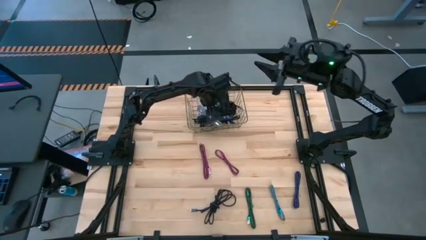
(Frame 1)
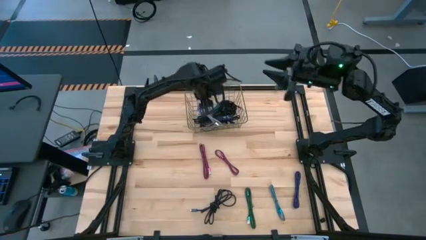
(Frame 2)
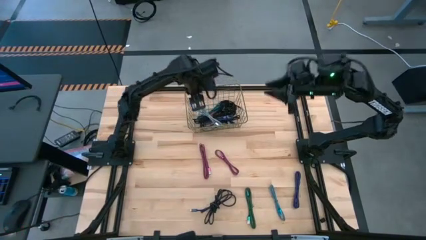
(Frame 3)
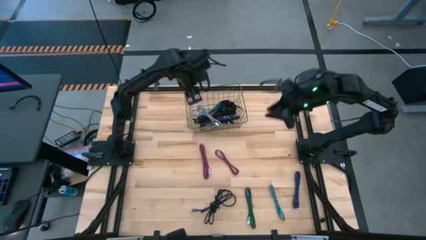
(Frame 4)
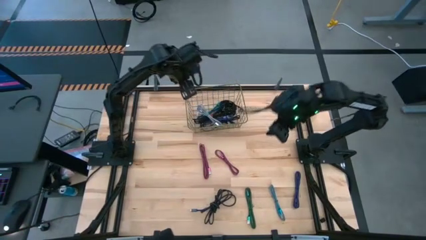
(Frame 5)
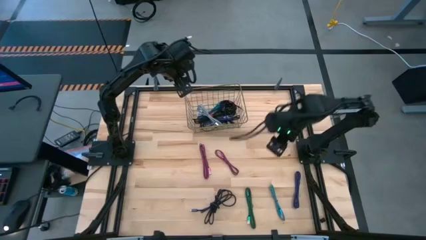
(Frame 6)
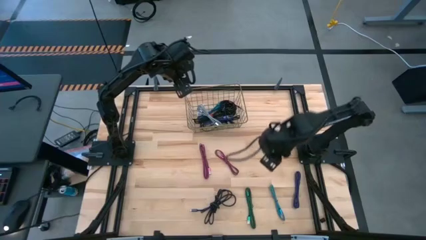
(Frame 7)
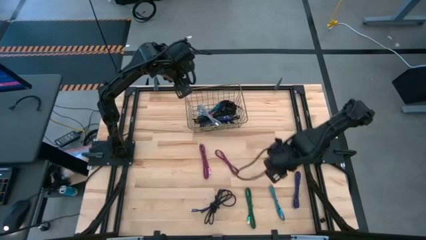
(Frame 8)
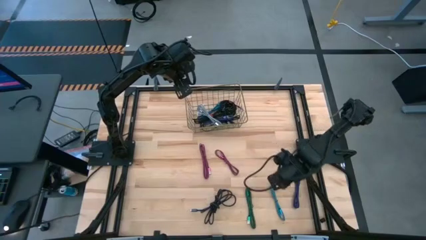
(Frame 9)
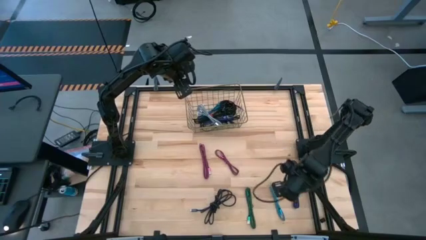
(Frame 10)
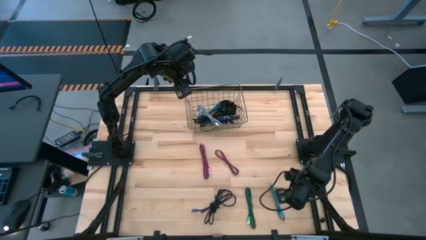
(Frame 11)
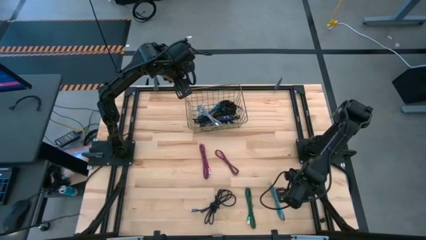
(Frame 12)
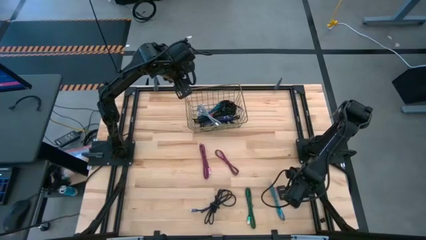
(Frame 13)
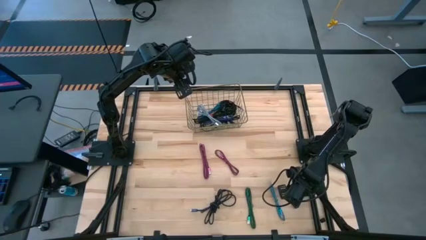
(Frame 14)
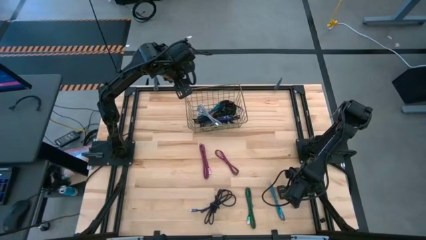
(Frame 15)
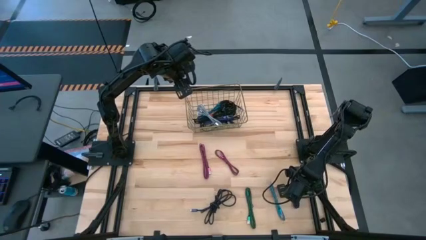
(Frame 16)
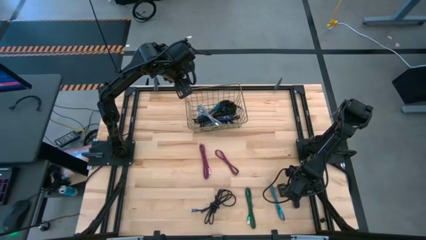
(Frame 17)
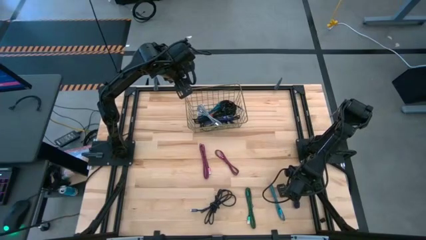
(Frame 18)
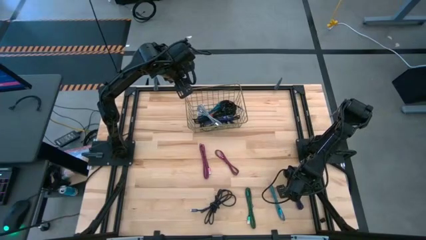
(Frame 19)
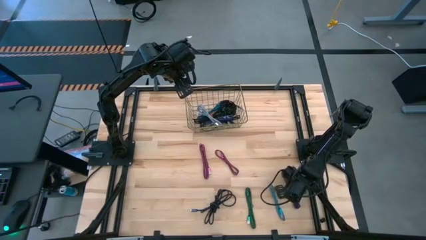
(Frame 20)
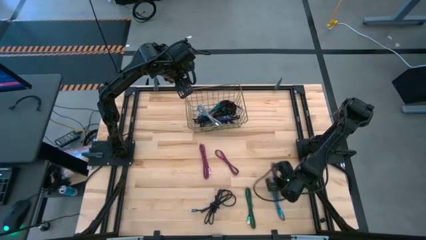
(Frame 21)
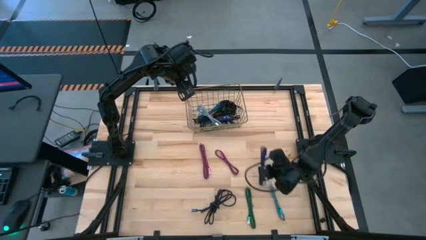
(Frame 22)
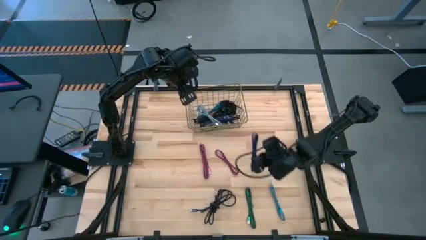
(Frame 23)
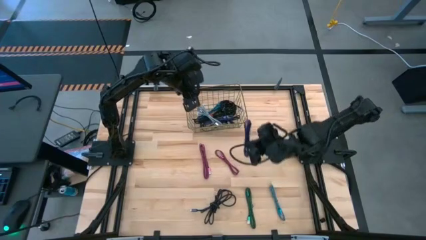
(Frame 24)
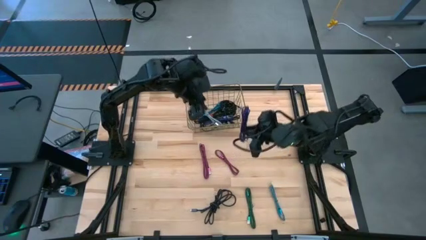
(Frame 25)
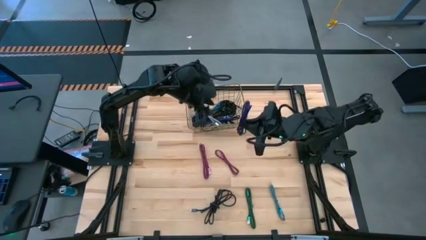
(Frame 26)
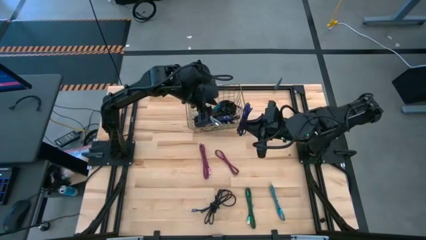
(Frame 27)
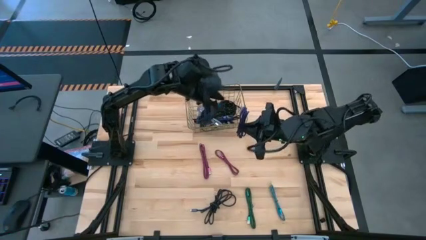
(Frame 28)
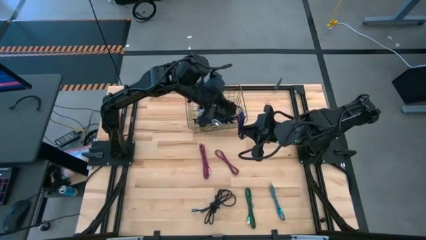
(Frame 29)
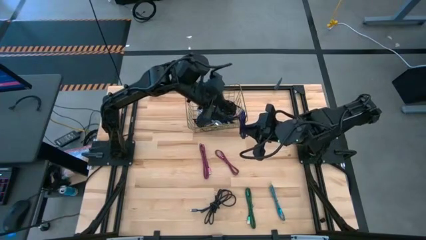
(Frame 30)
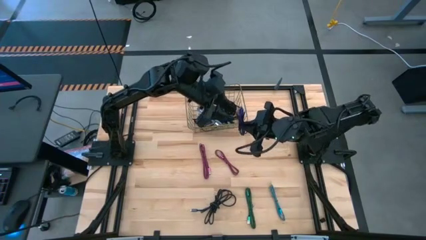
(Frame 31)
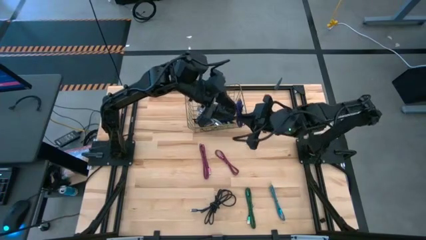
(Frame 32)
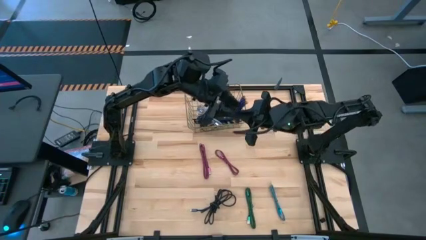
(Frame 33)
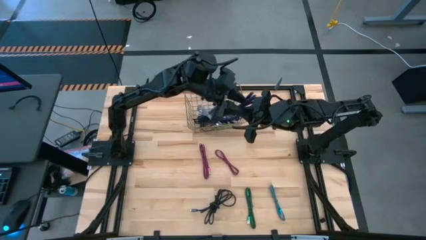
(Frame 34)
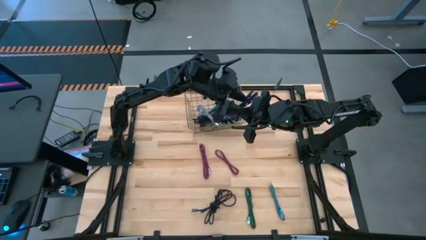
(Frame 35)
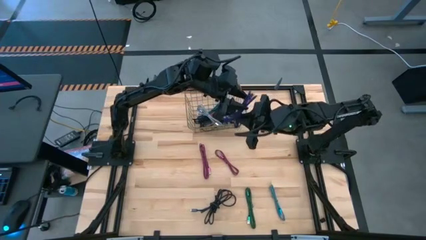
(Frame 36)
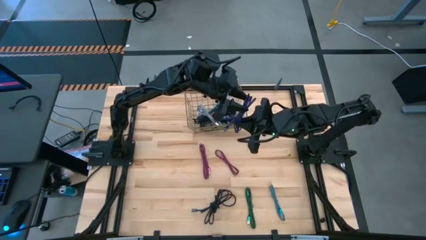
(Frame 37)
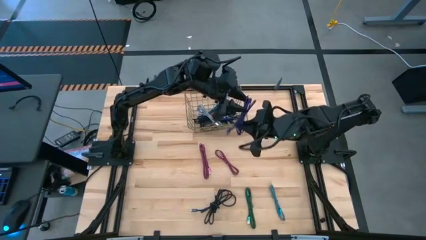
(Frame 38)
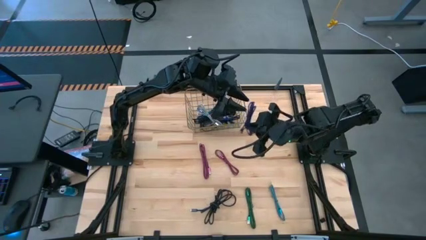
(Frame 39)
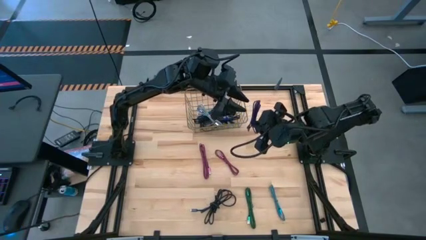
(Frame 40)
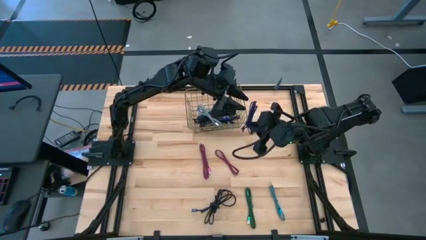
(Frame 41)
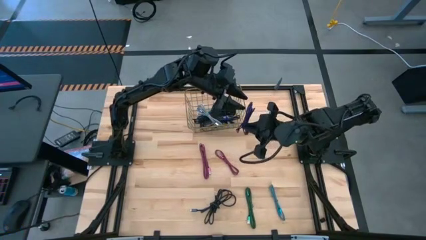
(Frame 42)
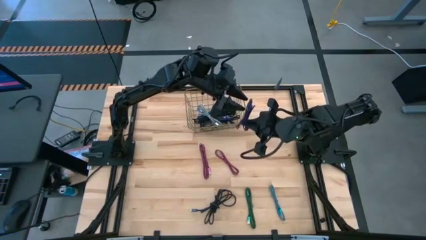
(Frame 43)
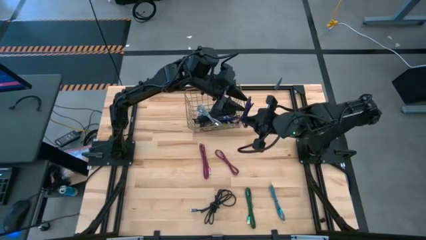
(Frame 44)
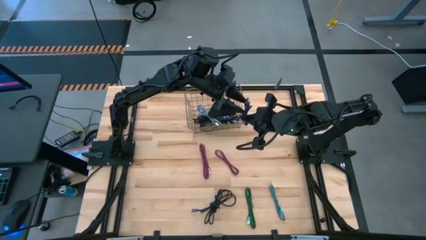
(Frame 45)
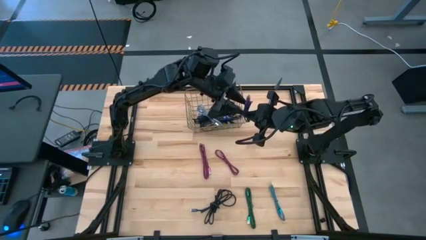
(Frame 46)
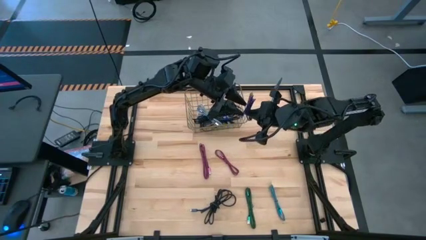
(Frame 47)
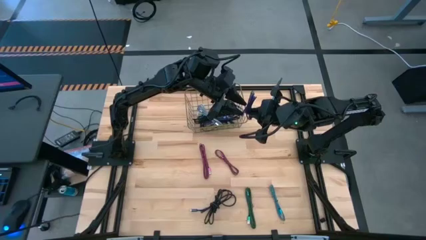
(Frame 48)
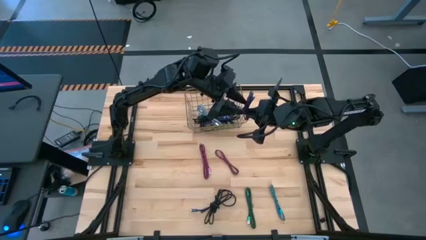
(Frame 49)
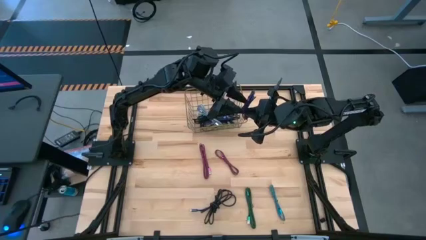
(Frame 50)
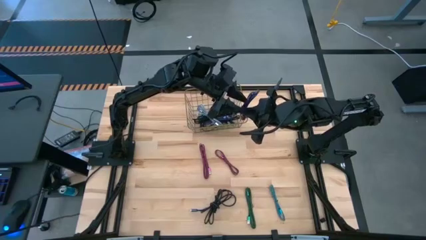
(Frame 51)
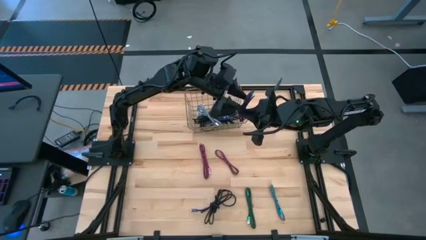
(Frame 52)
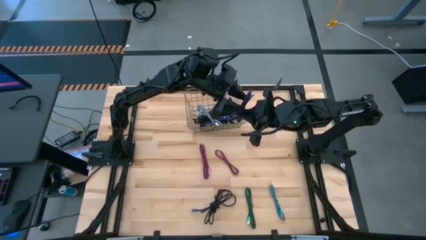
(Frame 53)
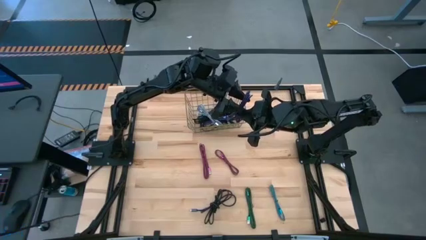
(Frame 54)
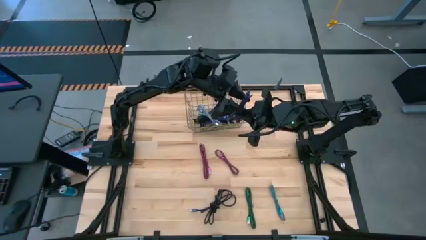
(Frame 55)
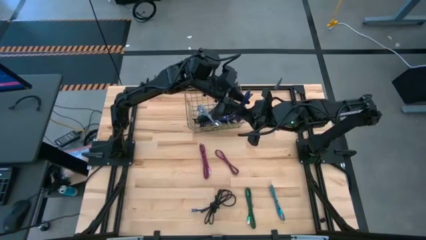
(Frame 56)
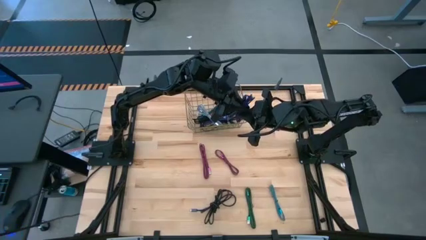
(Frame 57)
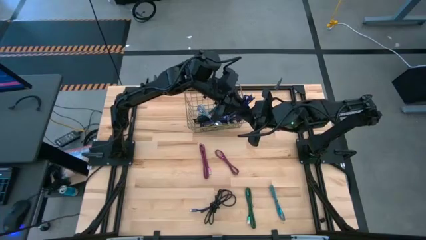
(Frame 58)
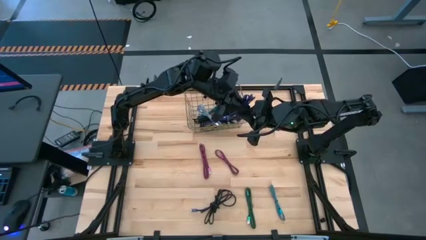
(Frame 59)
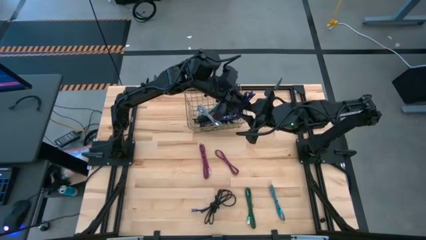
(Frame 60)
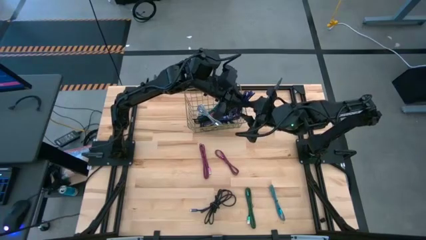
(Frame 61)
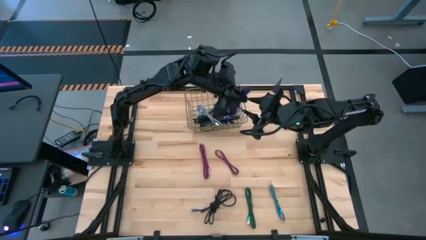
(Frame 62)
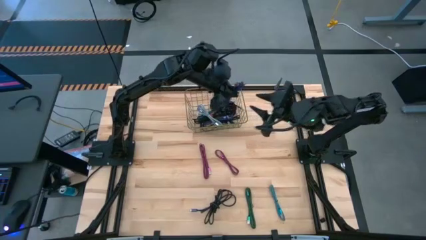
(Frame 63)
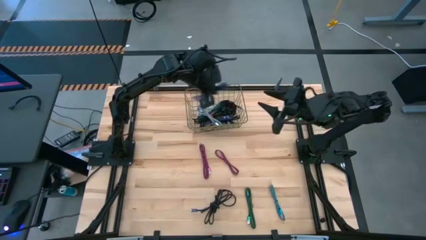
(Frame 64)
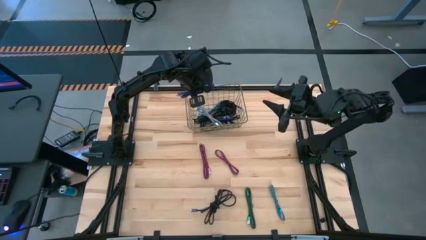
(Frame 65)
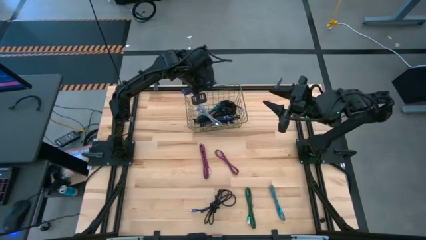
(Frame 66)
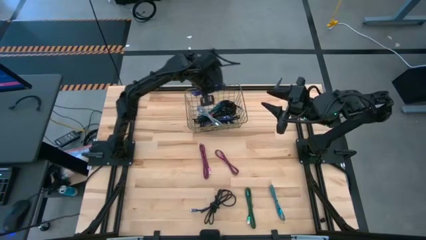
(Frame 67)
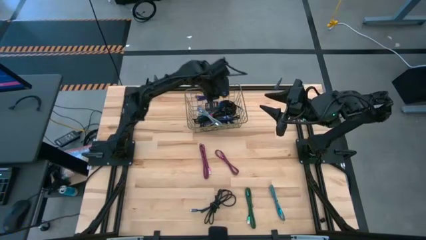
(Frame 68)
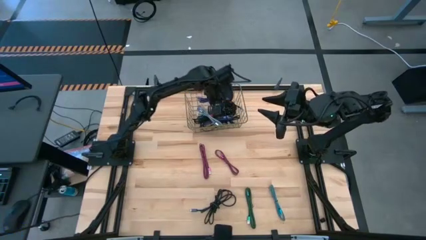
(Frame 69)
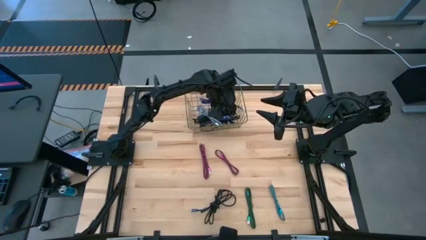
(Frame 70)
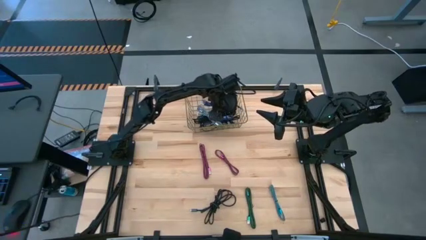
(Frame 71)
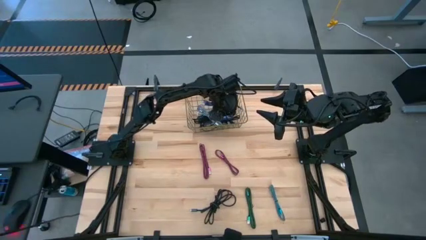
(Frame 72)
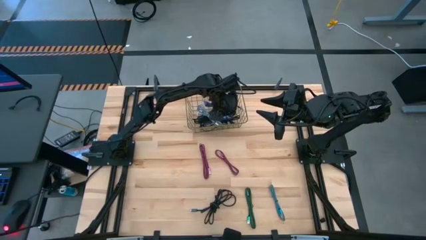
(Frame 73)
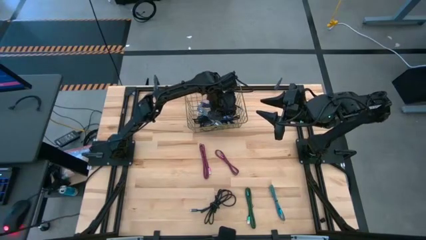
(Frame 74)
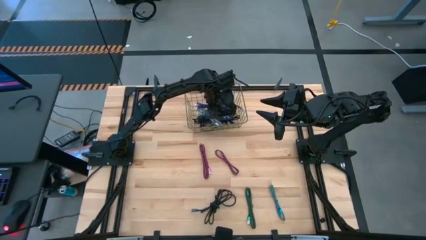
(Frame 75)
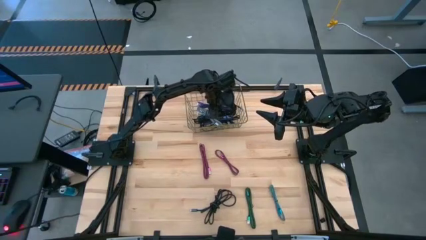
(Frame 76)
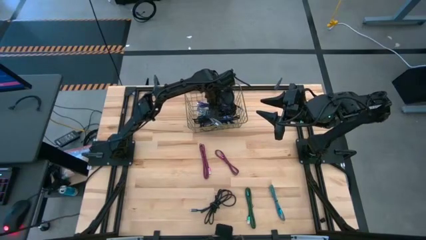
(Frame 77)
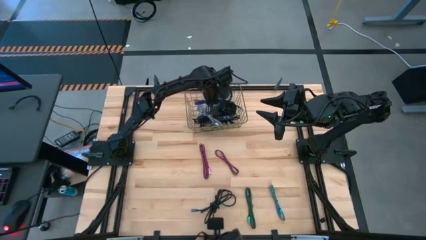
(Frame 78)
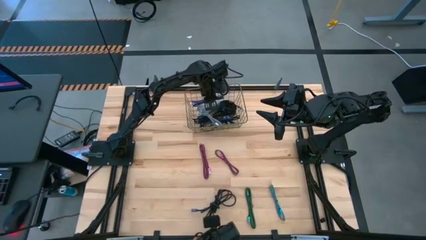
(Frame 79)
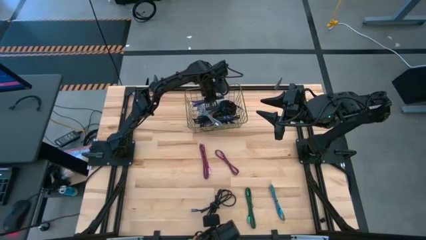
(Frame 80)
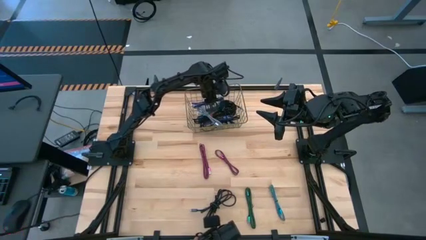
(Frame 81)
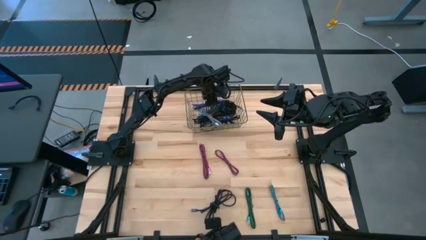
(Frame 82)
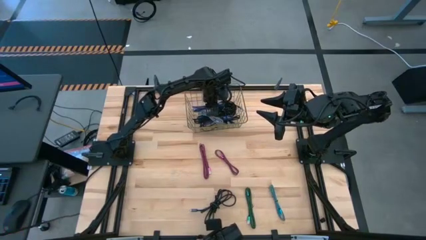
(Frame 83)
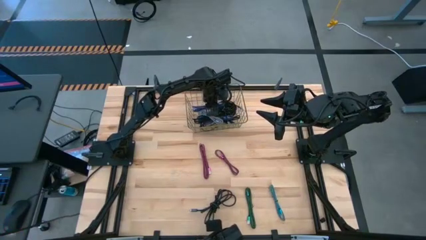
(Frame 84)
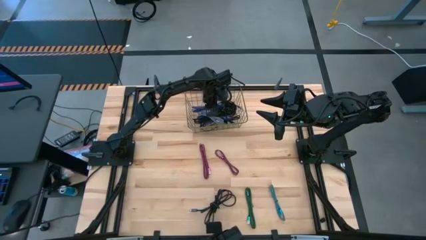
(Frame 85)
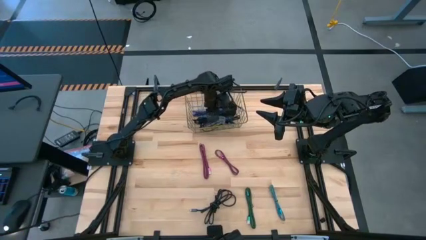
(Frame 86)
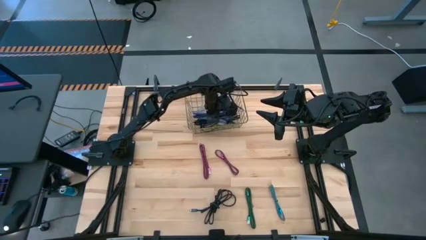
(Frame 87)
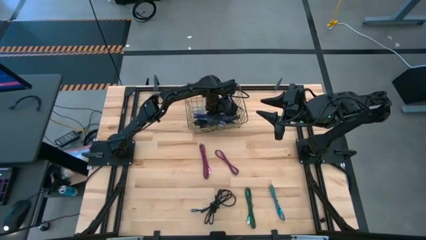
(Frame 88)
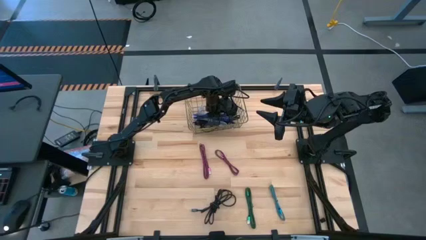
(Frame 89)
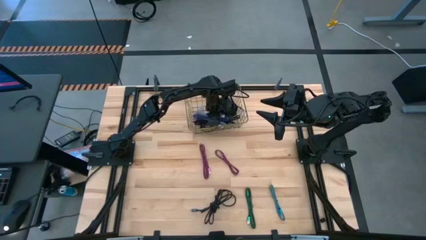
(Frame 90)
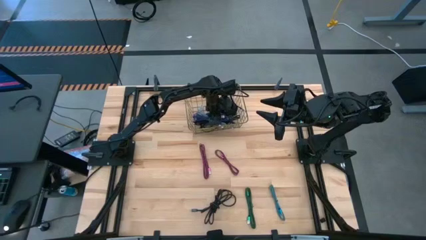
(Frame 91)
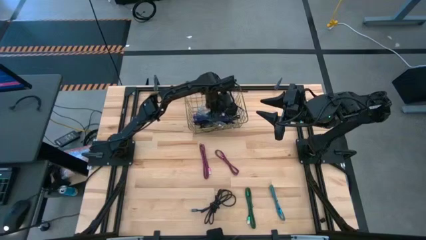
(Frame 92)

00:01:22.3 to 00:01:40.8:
Task: Pick and place USB-C Cables
Put the dark blue charger cable into the wire basket
